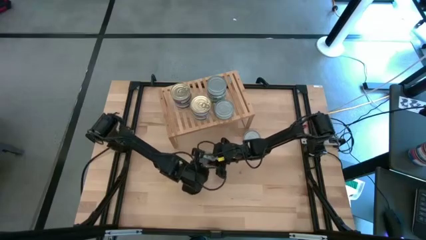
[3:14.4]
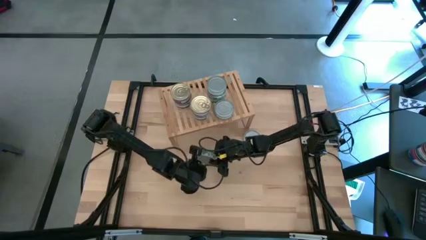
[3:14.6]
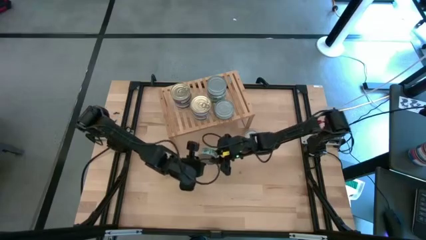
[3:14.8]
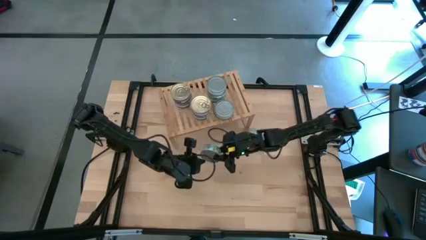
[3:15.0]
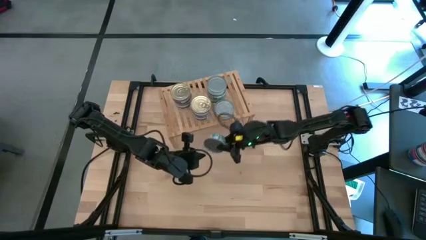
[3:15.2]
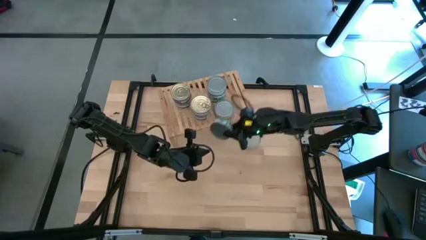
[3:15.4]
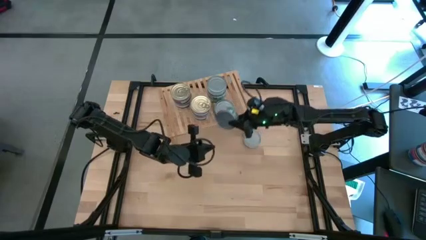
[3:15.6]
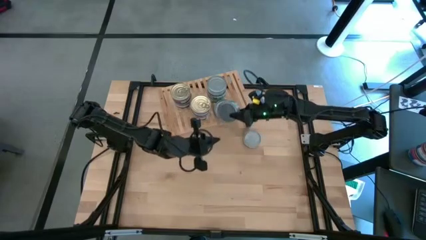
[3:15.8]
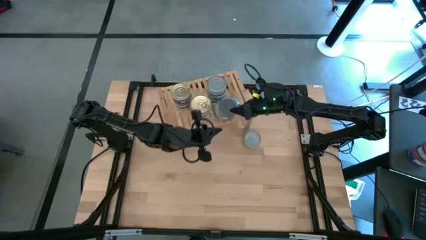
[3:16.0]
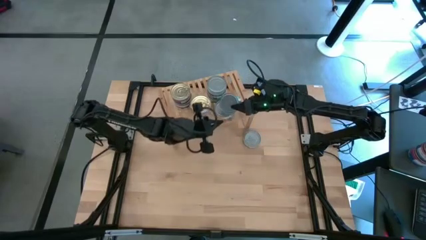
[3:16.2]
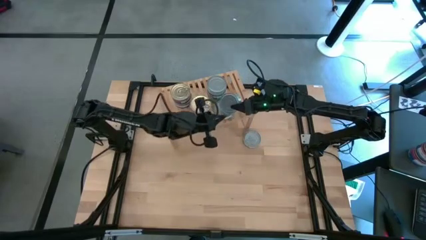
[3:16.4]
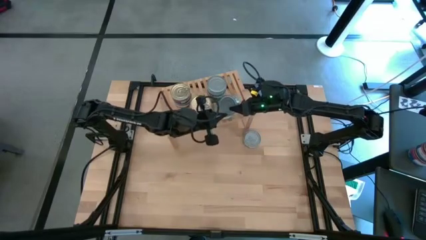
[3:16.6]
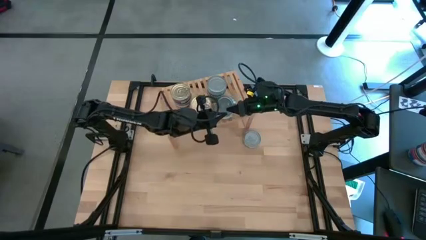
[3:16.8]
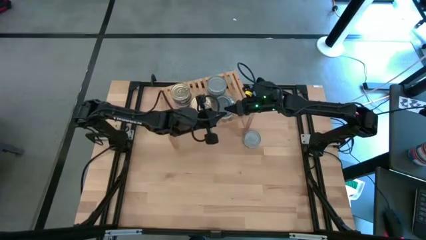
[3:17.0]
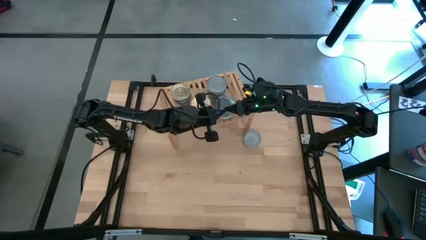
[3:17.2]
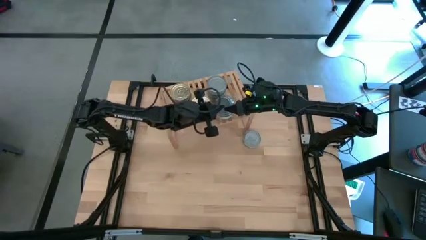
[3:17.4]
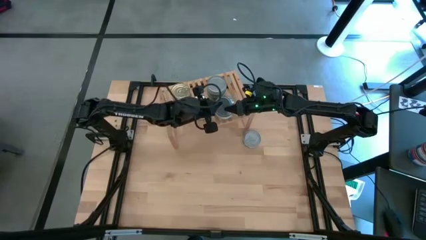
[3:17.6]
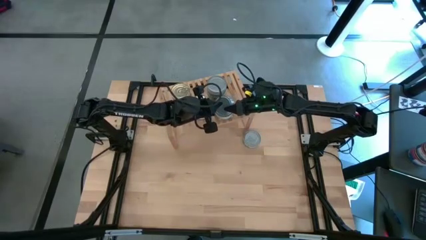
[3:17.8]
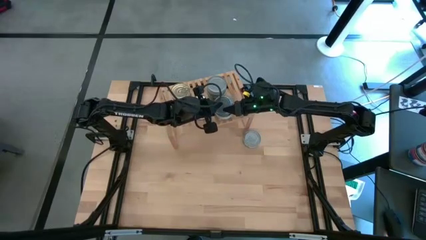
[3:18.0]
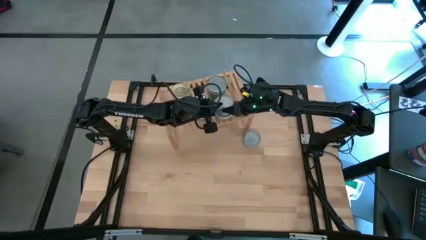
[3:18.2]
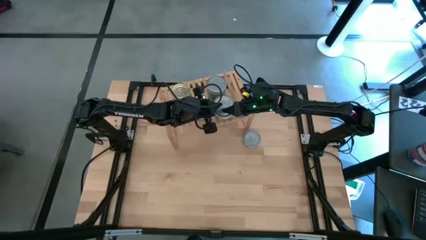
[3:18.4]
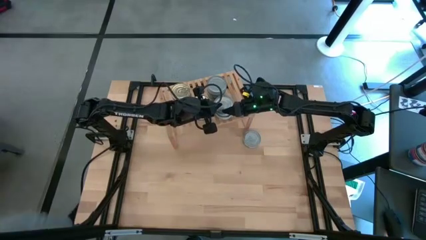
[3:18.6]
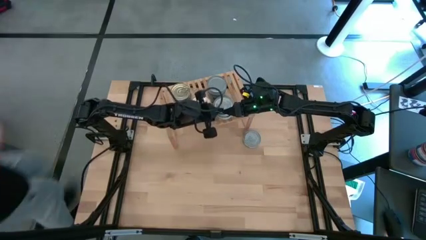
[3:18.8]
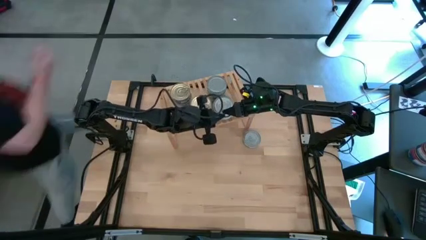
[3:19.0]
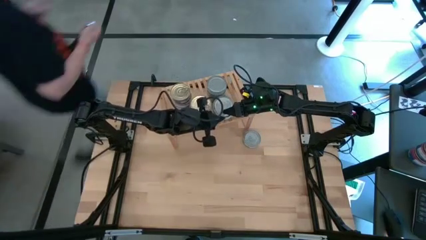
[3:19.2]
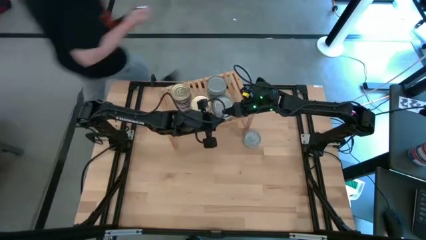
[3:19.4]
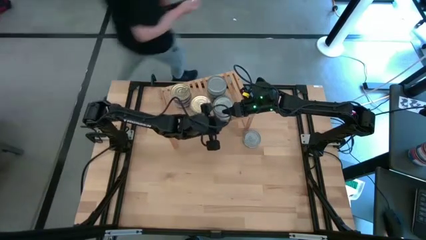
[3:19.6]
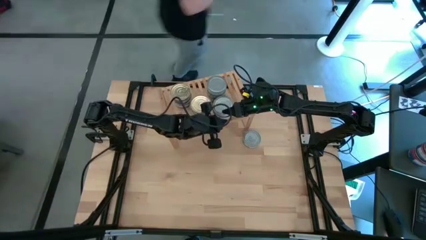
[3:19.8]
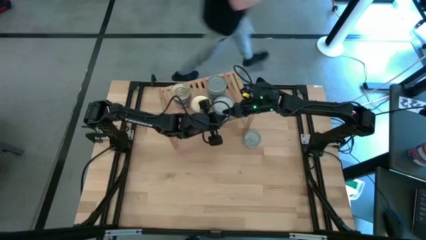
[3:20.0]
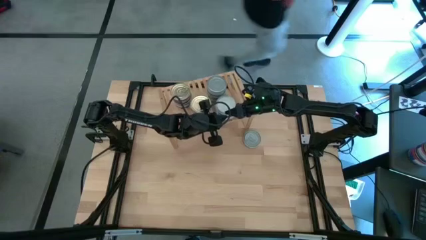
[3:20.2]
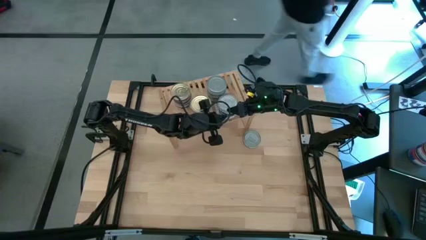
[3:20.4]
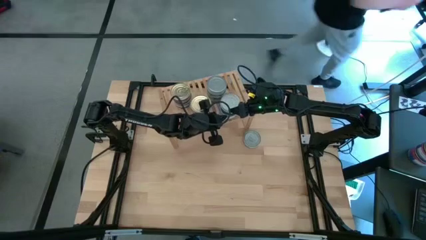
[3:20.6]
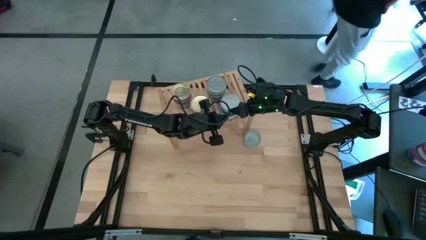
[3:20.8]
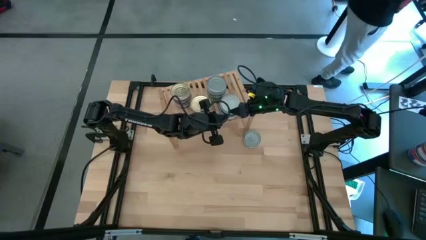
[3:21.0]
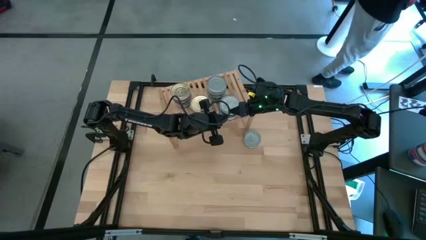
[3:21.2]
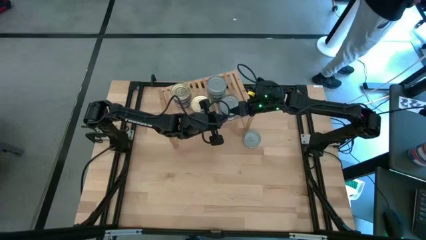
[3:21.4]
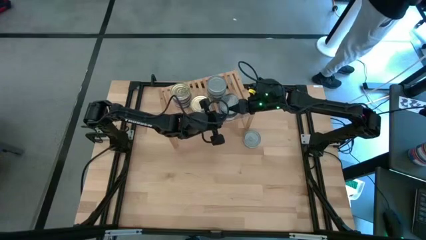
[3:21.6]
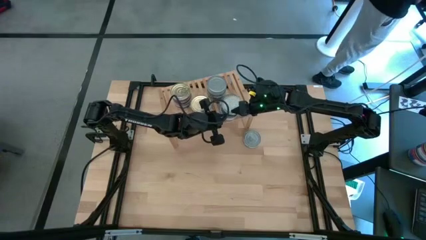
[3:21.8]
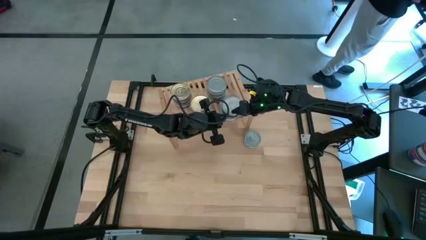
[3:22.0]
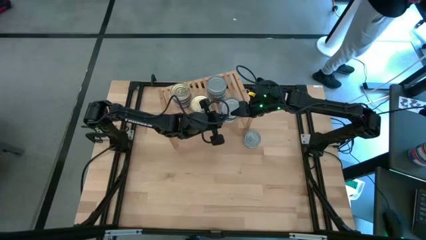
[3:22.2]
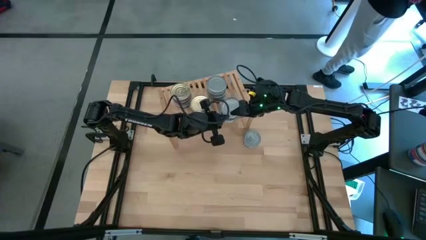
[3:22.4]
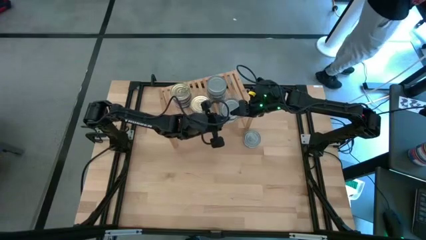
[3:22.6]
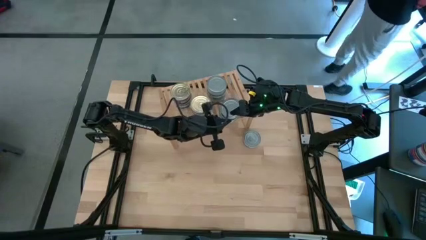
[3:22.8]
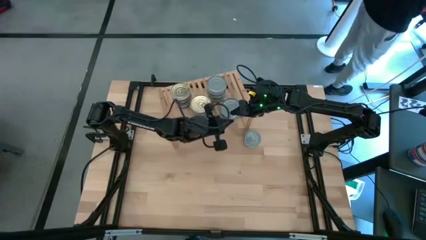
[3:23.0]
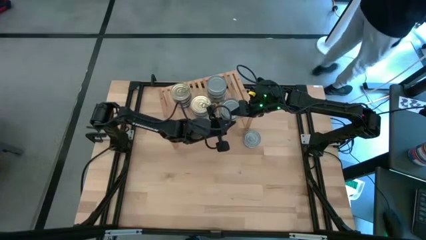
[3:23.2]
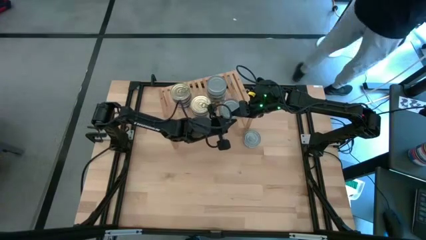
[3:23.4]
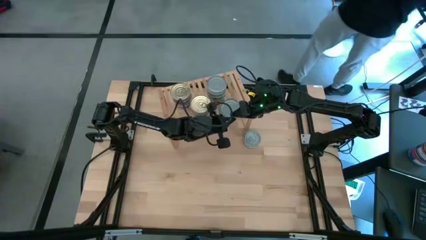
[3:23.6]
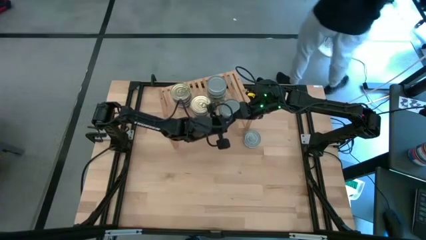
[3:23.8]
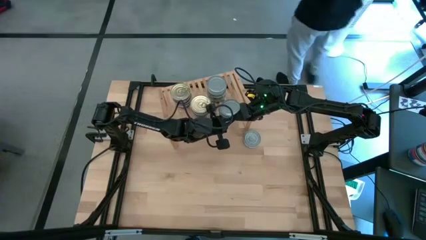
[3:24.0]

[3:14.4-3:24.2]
Task: Stack canned seafood by type on shelf
Stack the green tuna can on top of the green tuna can on the shelf

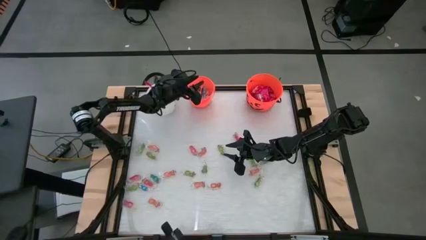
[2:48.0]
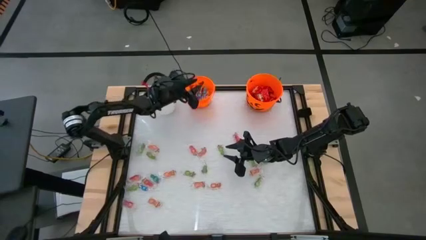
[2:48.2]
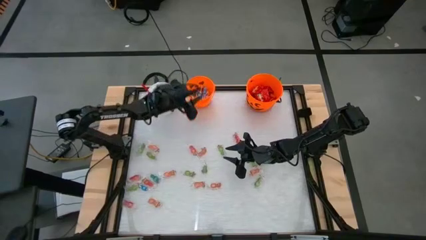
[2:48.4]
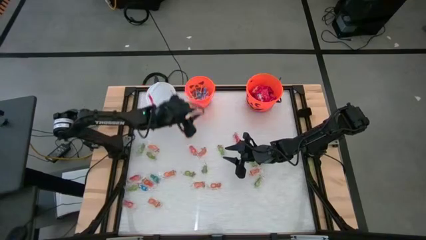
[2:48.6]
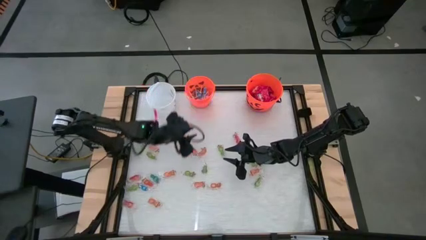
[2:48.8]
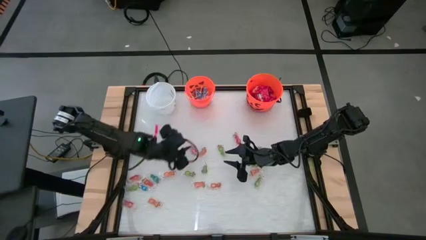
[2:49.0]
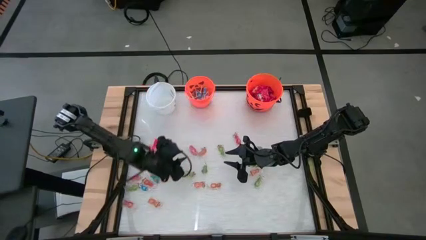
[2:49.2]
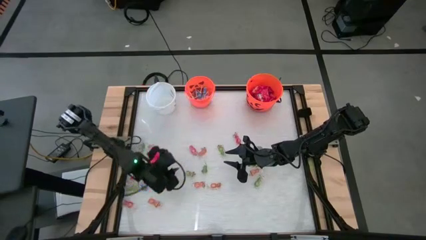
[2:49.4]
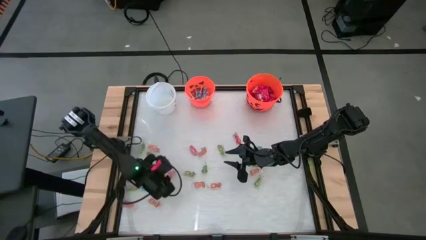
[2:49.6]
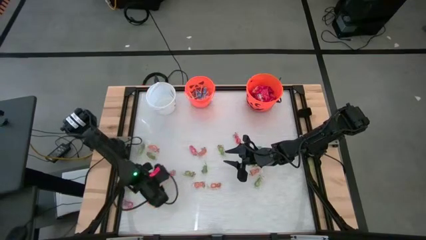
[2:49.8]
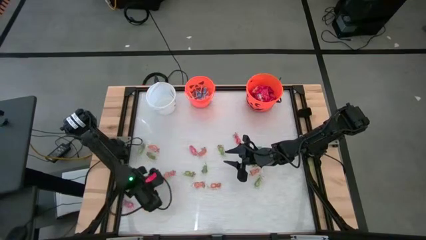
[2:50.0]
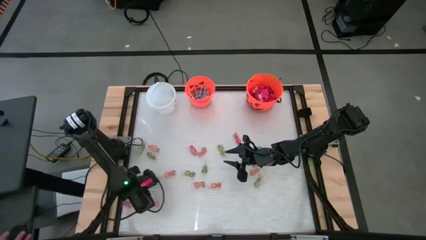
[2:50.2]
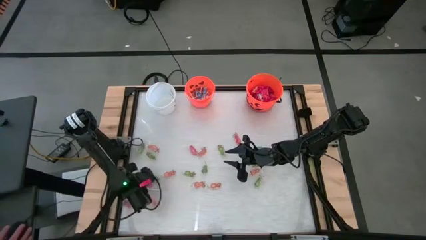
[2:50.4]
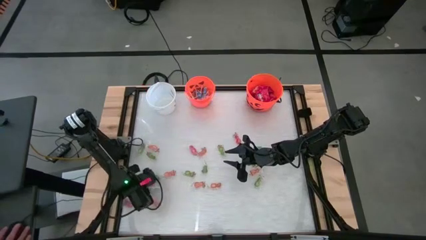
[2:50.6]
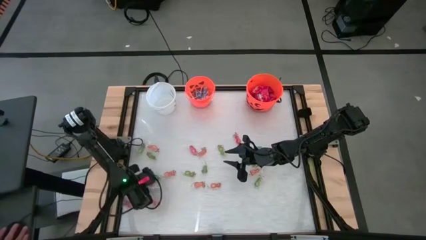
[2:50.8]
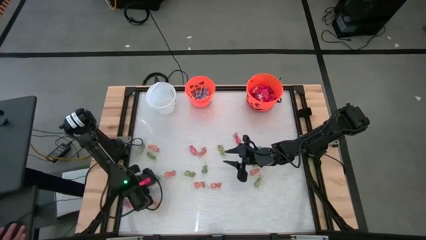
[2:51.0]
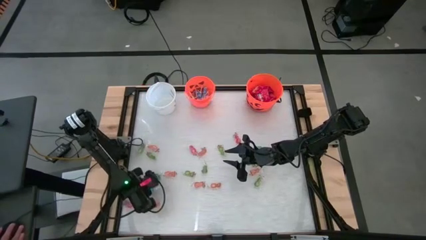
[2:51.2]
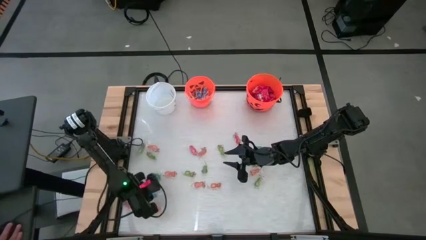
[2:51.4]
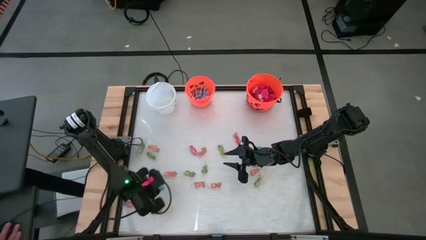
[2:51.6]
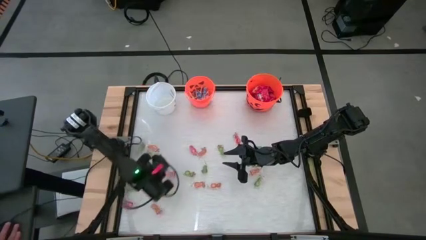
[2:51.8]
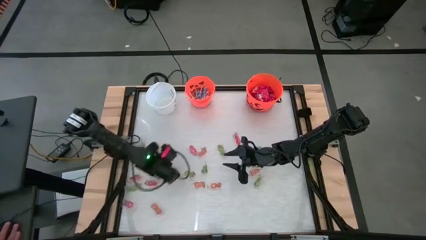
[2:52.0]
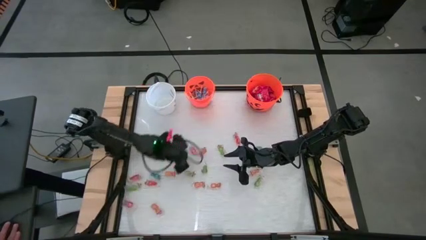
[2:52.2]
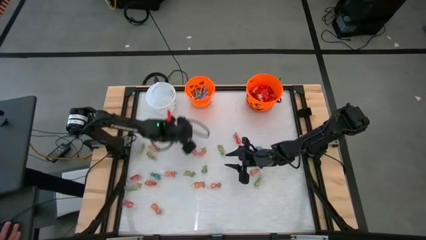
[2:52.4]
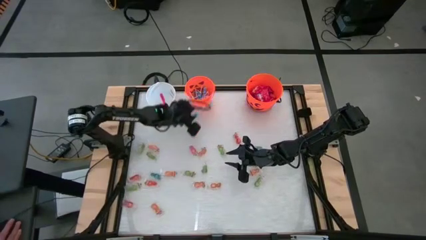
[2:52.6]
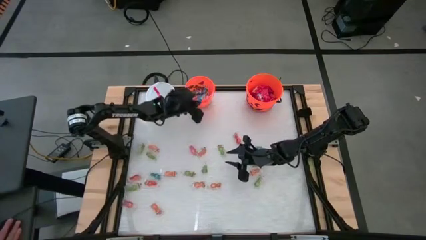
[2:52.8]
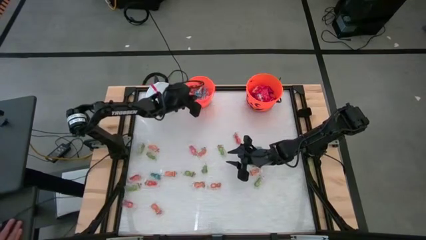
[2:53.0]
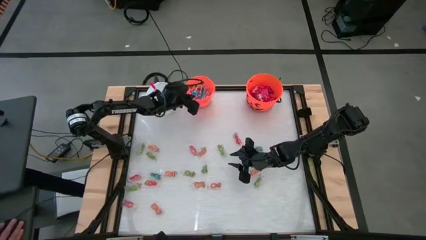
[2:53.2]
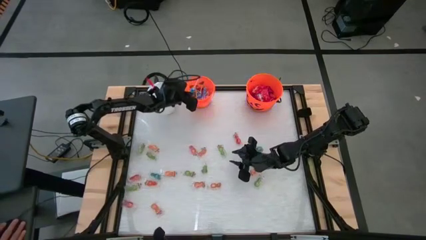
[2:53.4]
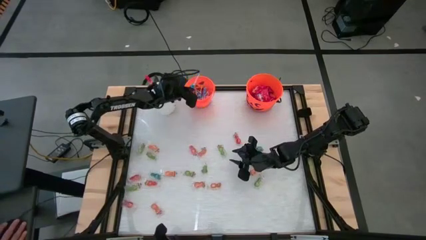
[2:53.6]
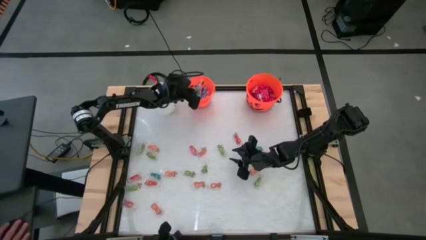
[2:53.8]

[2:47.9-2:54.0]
Task: Sort candy by brand, put in halloween buckets
Put the blue lollipop into the left orange bucket
